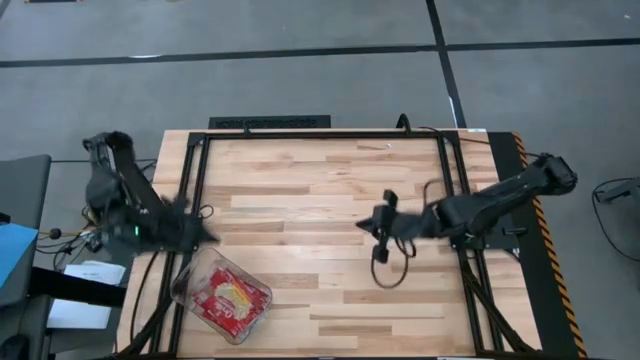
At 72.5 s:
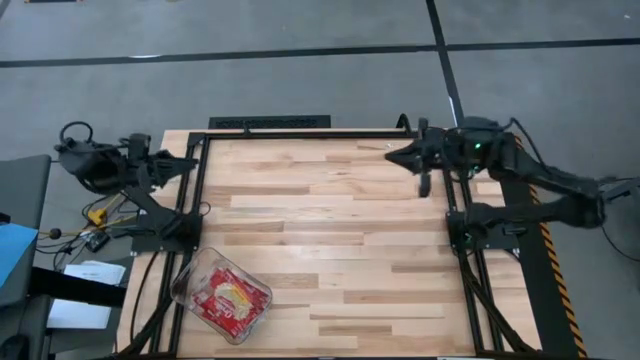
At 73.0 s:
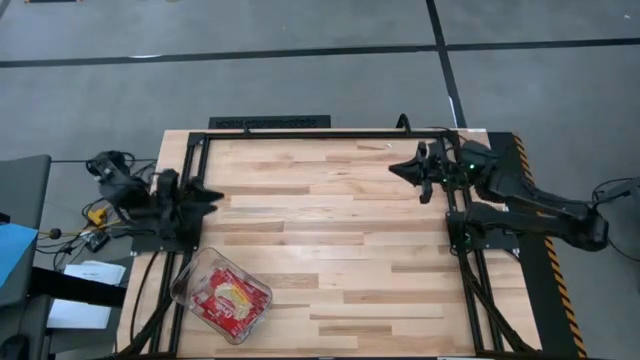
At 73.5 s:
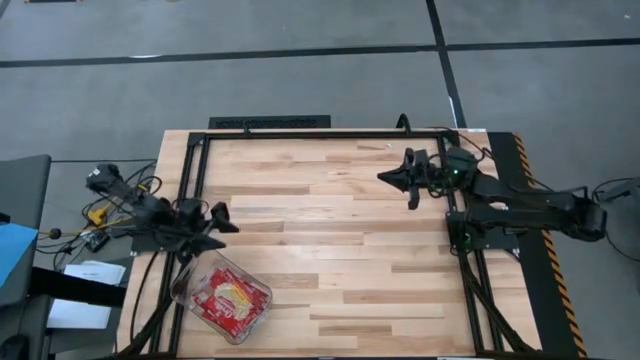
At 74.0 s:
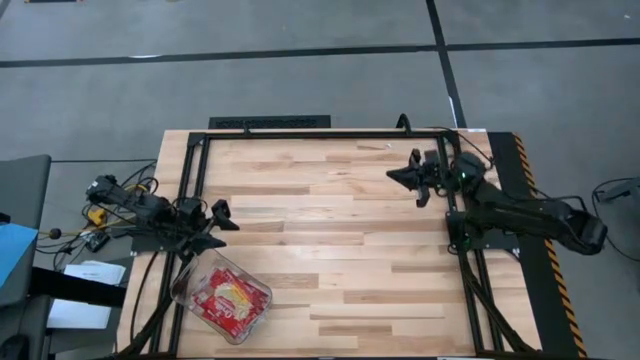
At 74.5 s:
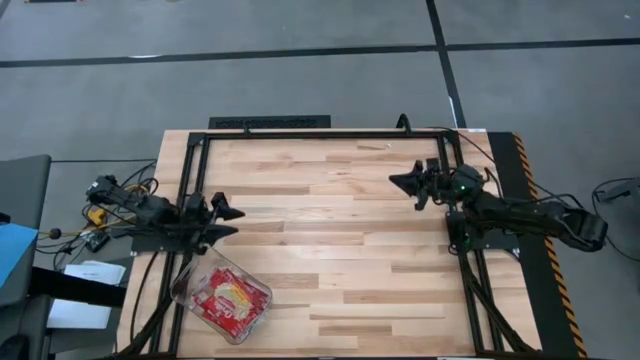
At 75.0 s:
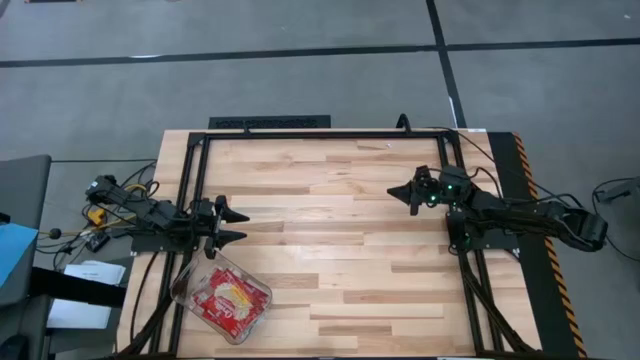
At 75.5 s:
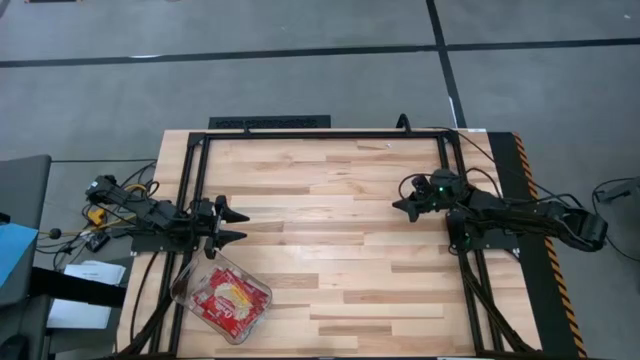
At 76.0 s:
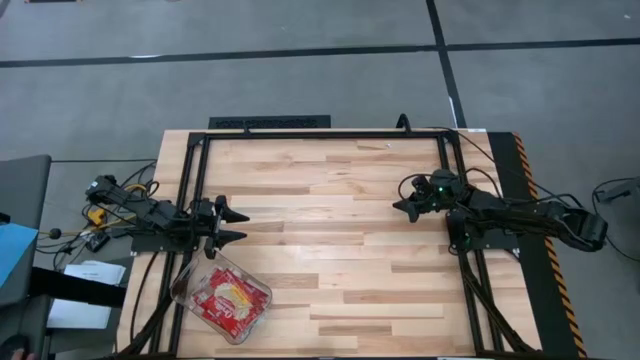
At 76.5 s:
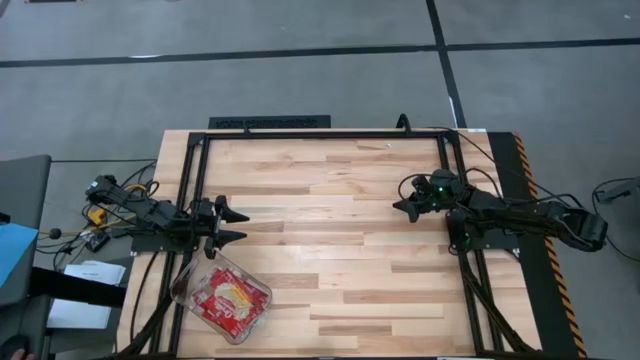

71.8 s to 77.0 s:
Task: Sort popcorn bags into baskets
Return to Home Position

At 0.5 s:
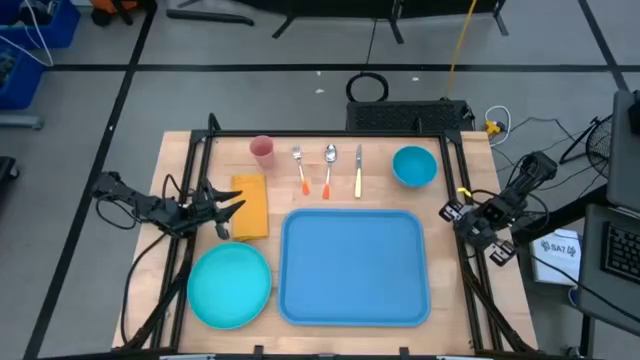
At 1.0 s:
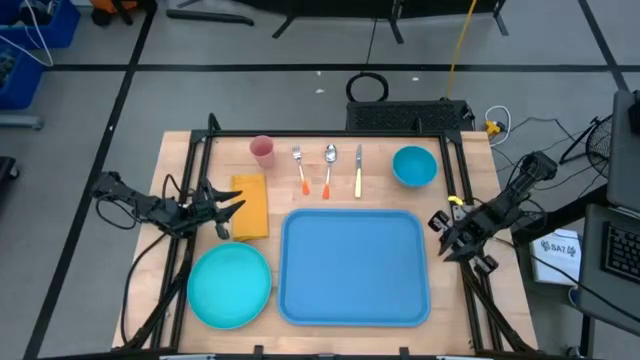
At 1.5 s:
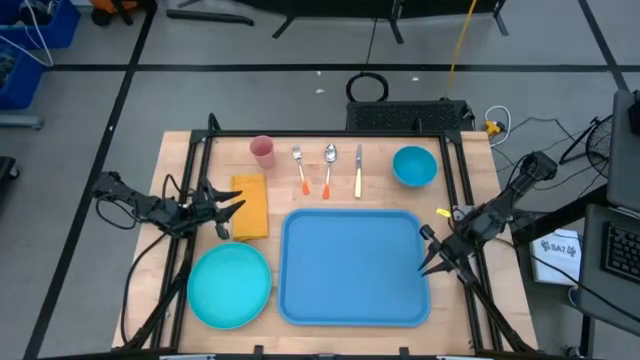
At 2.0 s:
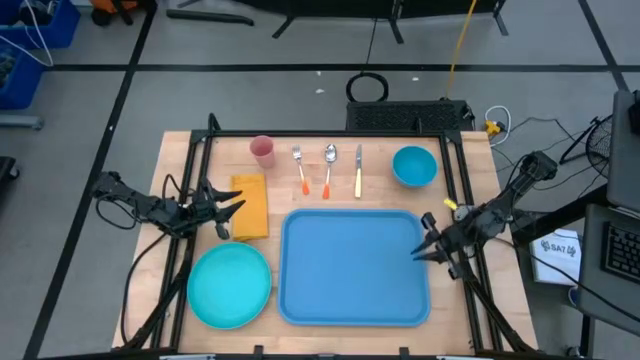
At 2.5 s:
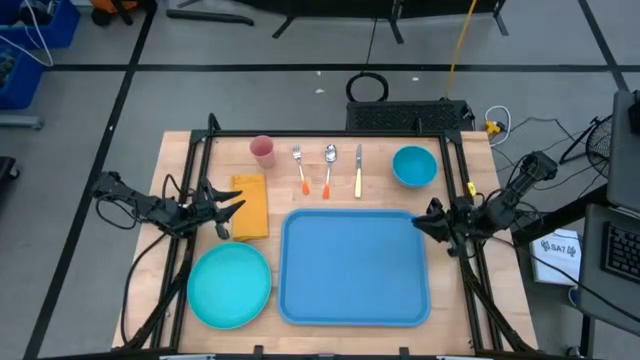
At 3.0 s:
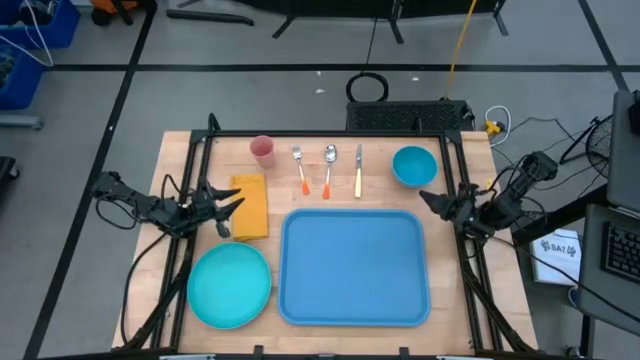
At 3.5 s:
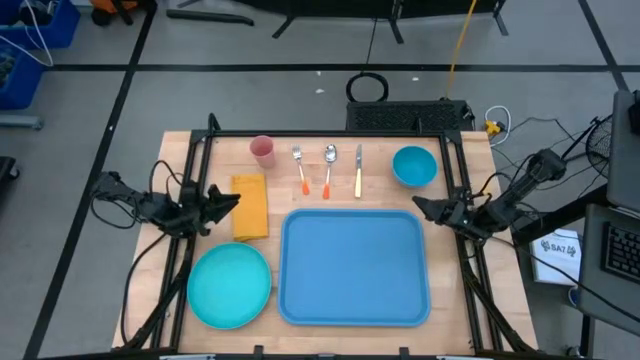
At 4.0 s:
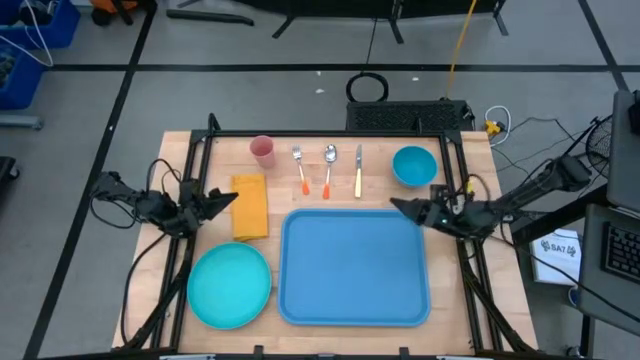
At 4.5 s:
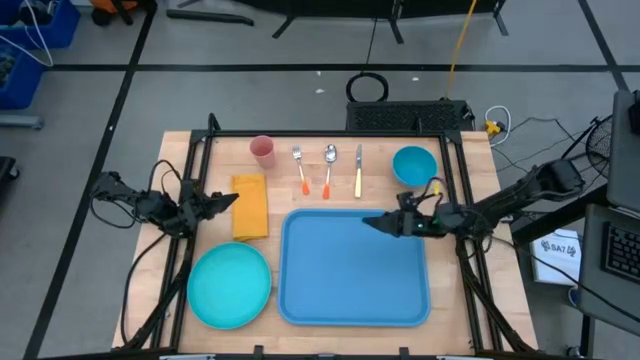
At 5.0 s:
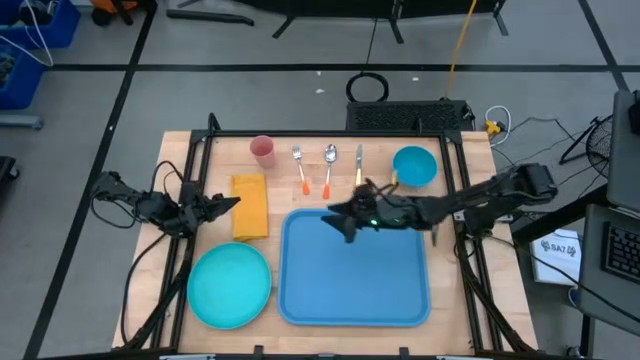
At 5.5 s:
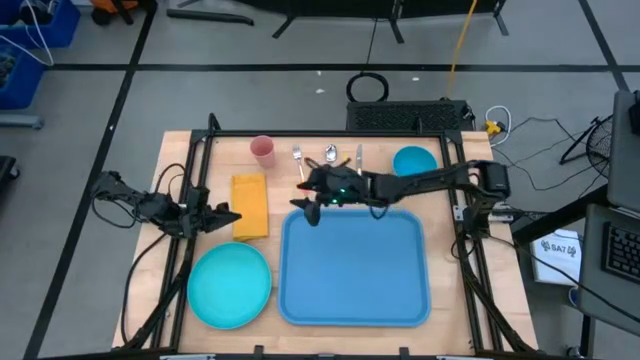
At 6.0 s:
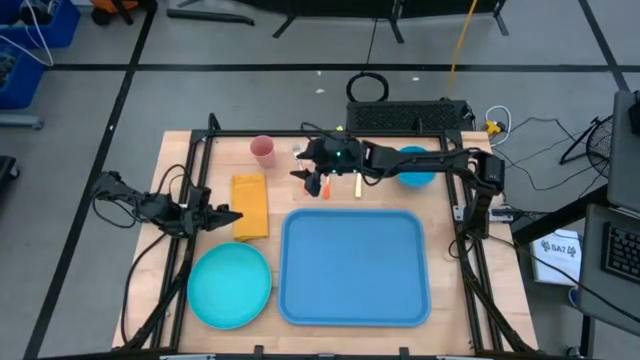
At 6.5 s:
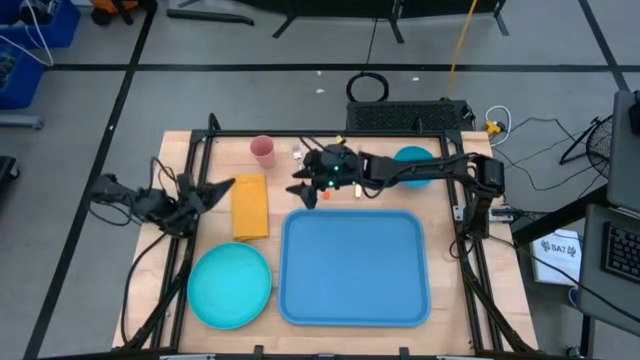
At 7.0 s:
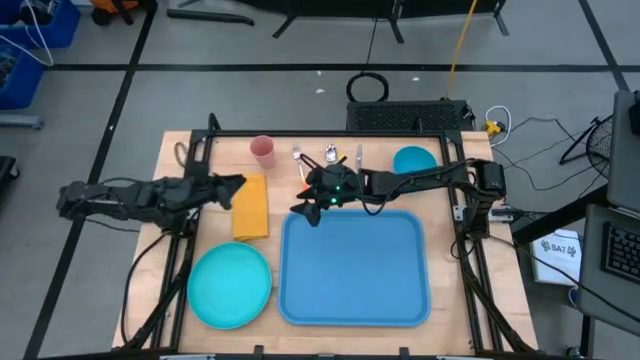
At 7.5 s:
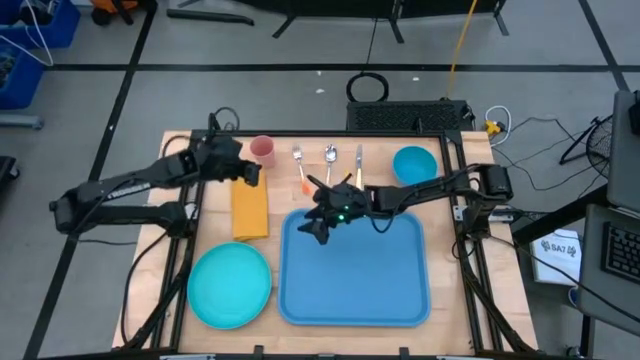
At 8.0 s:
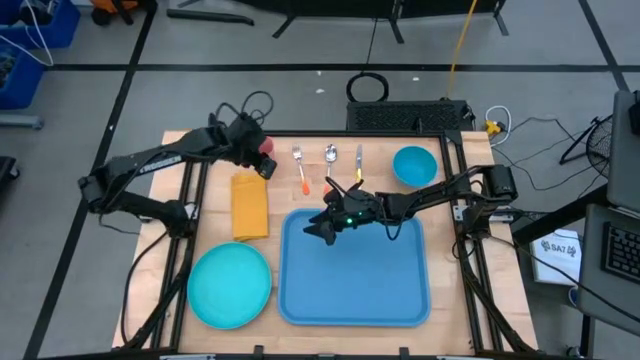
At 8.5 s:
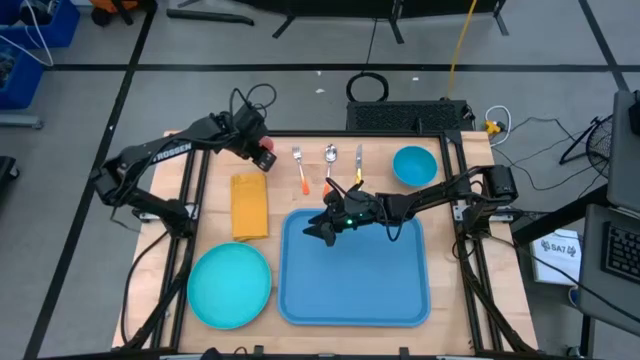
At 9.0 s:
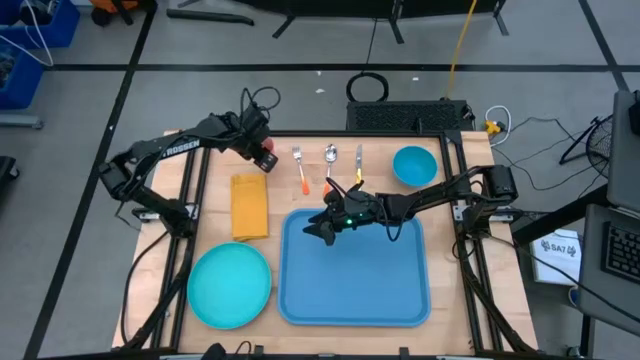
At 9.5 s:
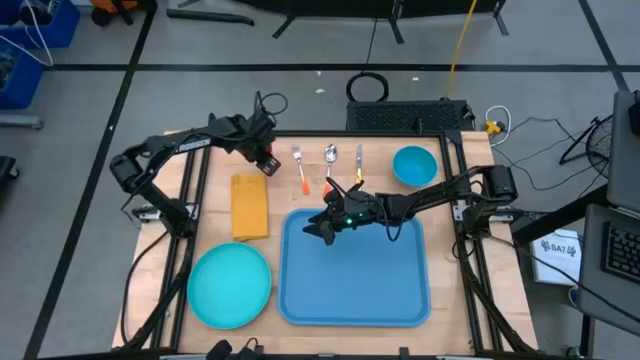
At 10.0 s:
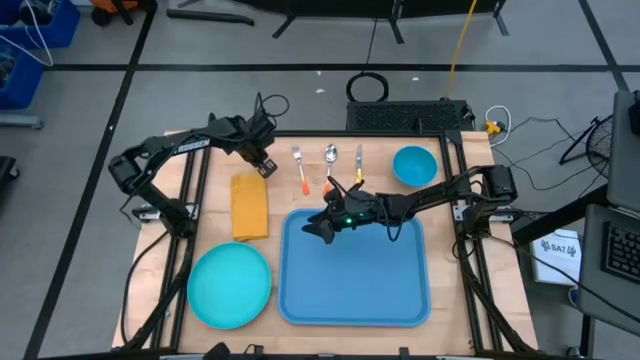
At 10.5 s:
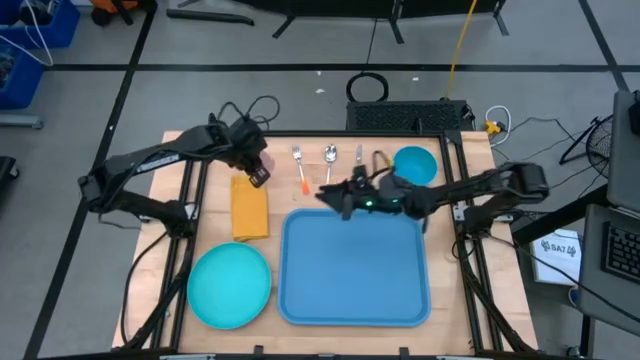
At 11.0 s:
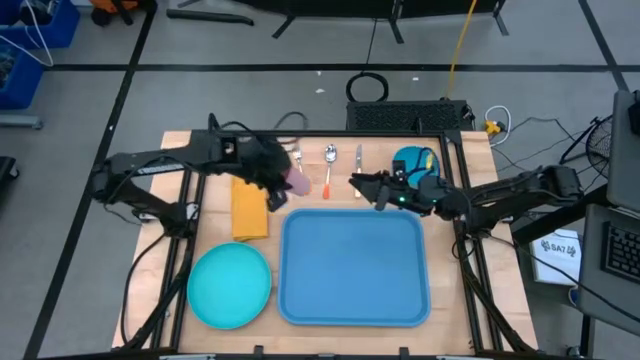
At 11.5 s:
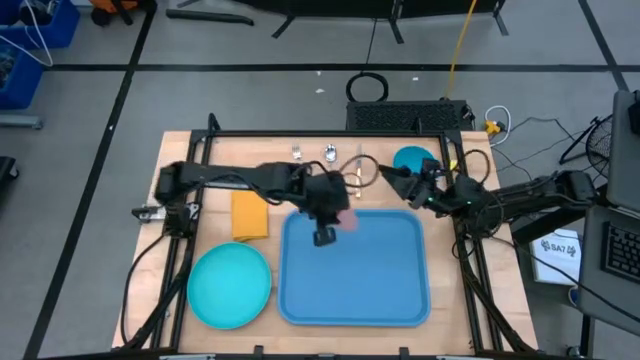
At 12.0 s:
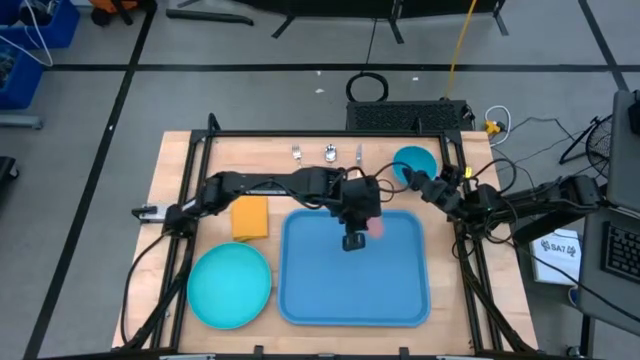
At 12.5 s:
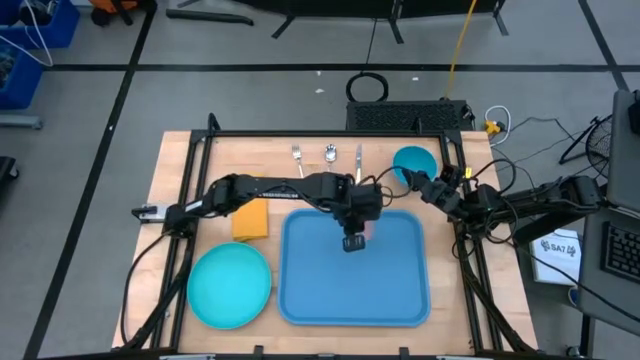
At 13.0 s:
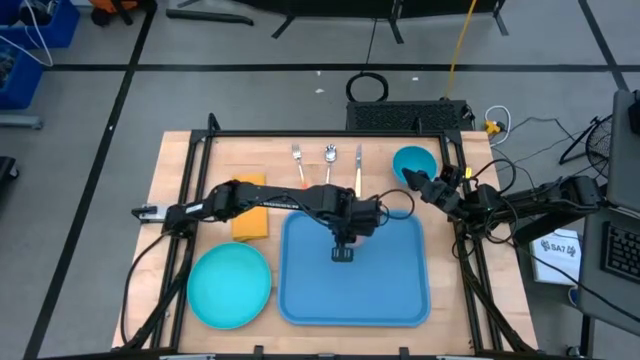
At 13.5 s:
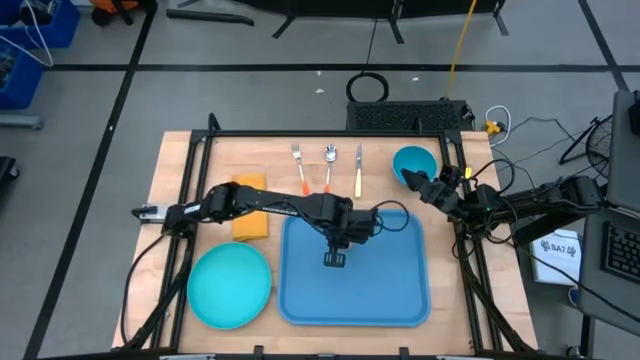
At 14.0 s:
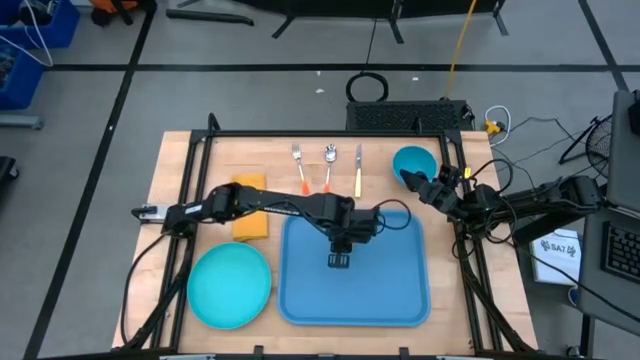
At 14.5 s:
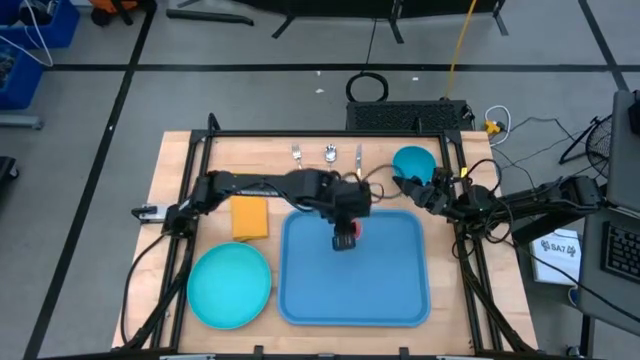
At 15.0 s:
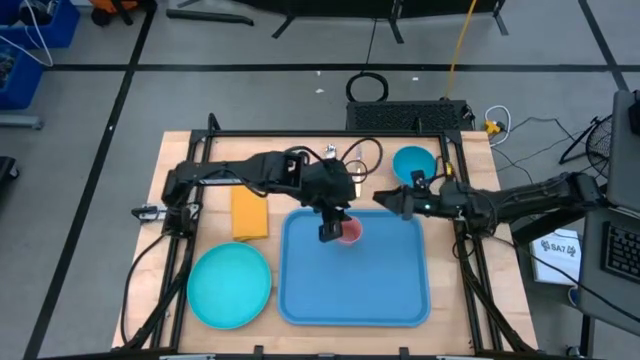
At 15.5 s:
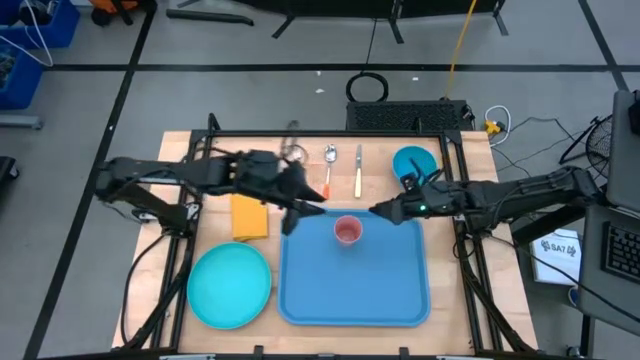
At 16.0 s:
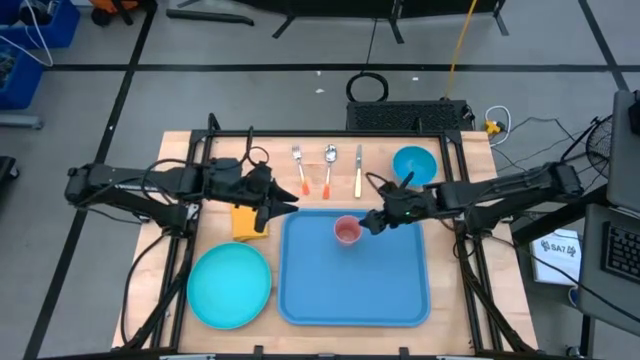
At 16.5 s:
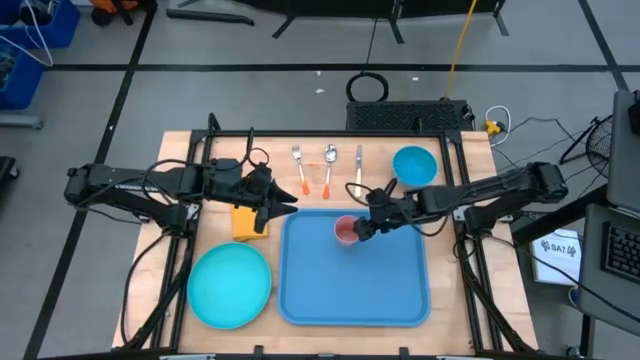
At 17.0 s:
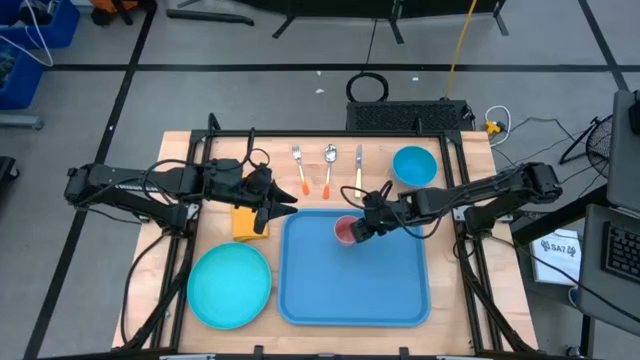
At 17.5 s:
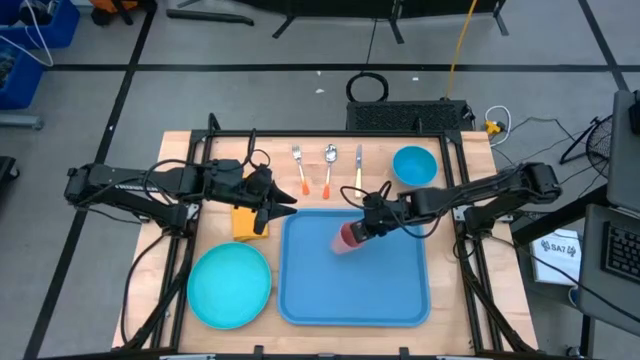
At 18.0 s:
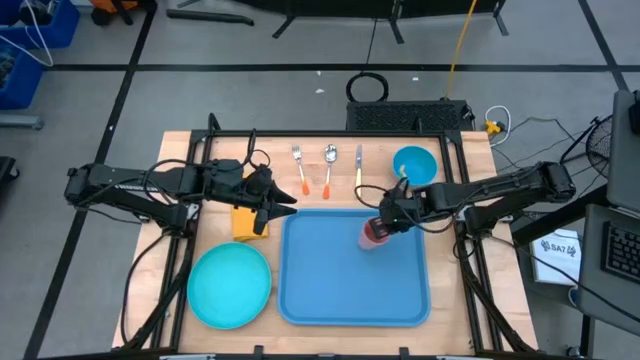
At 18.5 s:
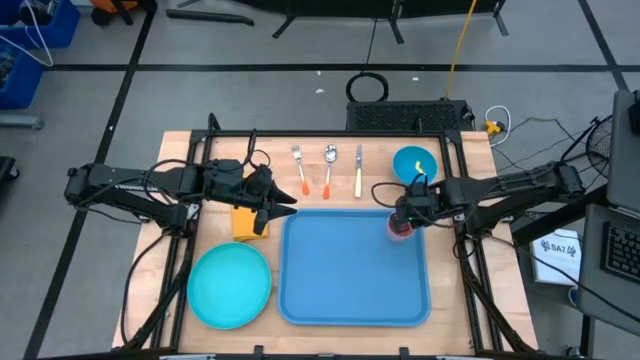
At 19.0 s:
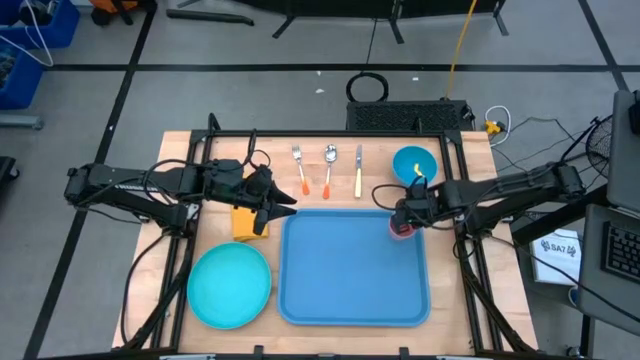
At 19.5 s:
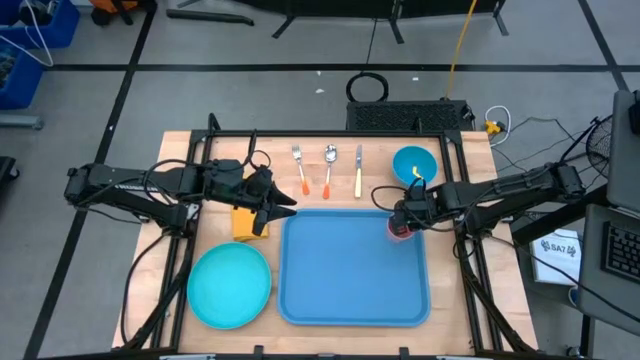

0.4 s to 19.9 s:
Task: Set up tray
Put the pink cup at the top right of the blue serving tray
